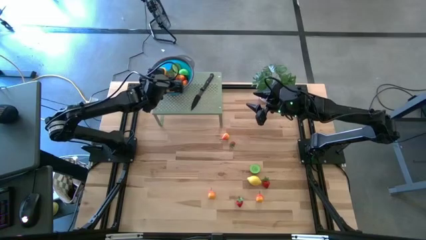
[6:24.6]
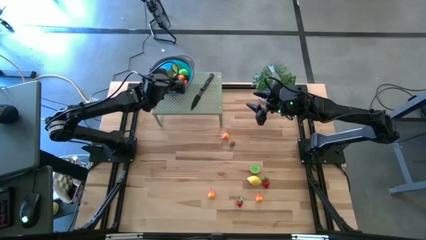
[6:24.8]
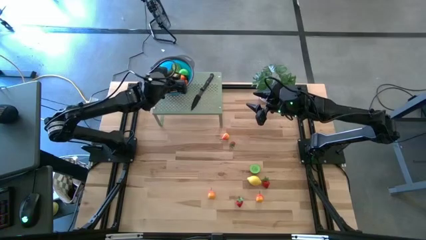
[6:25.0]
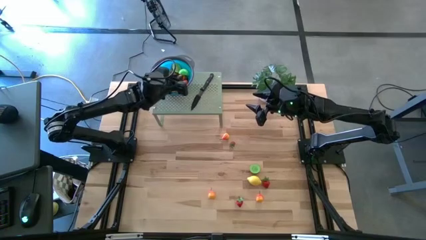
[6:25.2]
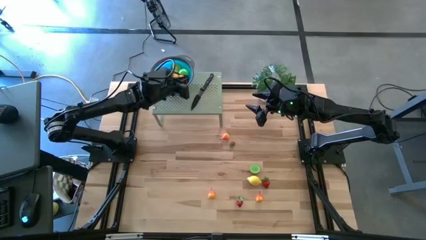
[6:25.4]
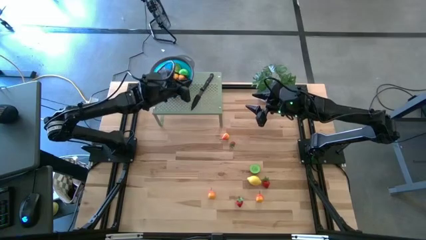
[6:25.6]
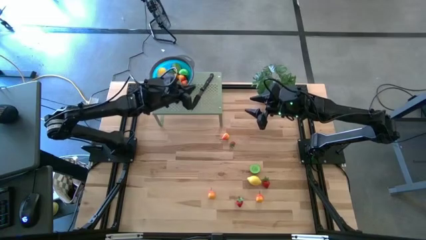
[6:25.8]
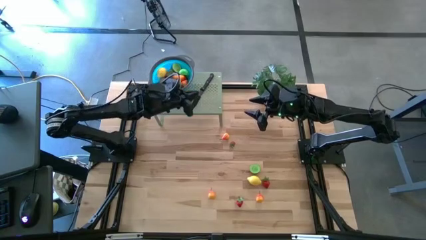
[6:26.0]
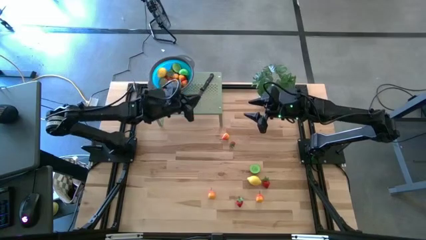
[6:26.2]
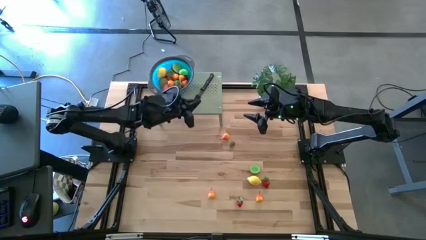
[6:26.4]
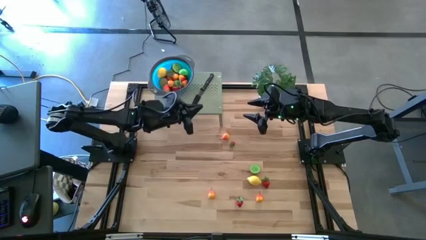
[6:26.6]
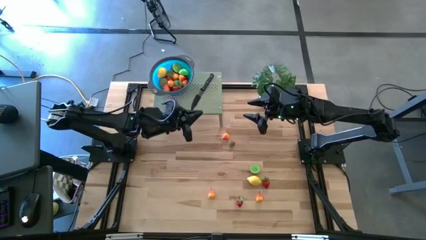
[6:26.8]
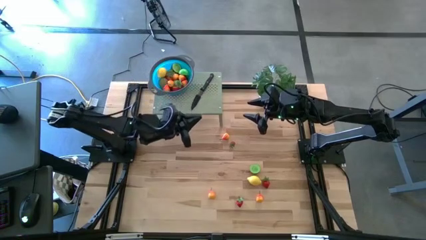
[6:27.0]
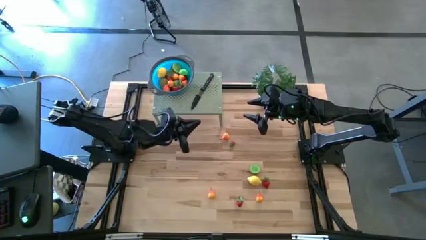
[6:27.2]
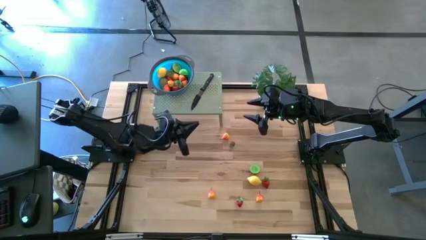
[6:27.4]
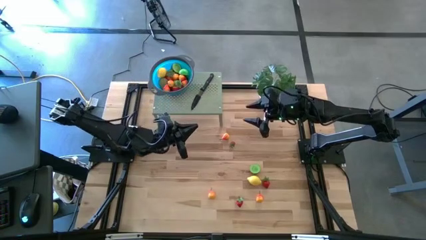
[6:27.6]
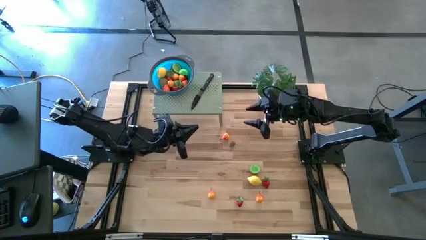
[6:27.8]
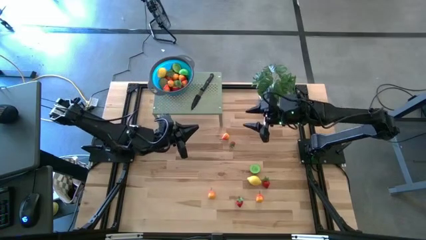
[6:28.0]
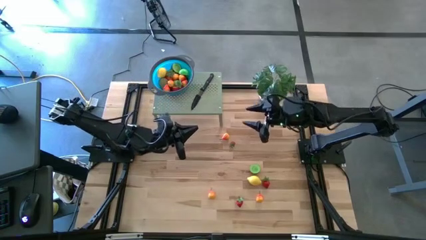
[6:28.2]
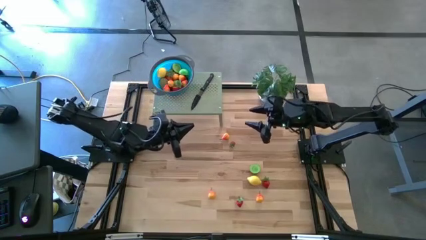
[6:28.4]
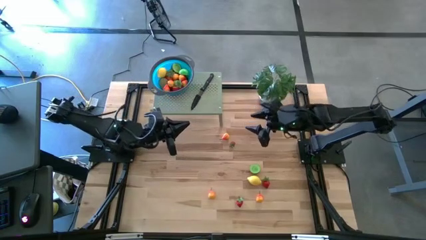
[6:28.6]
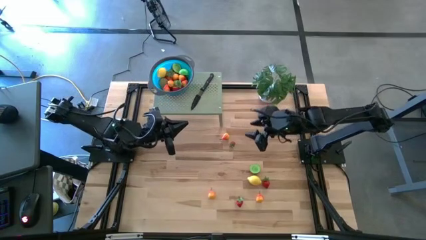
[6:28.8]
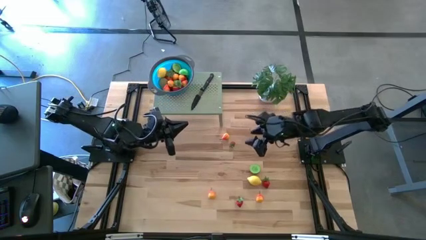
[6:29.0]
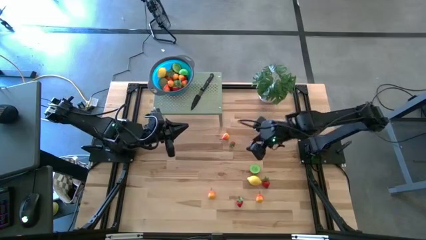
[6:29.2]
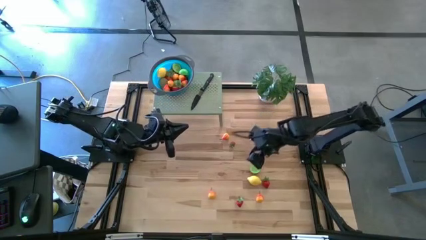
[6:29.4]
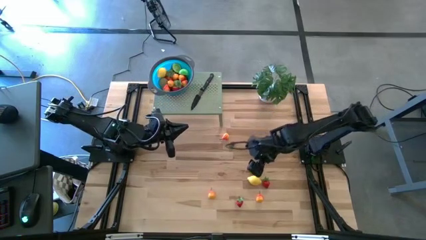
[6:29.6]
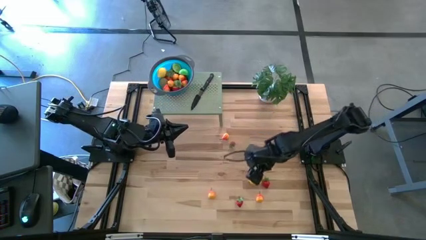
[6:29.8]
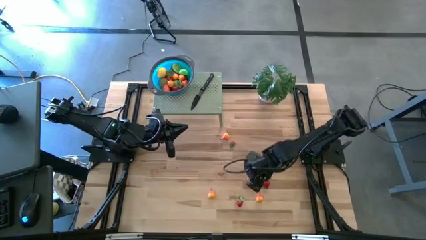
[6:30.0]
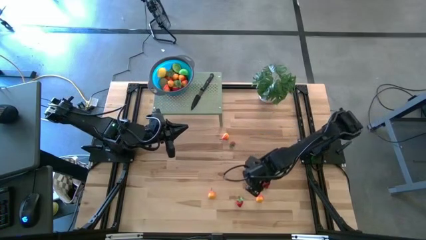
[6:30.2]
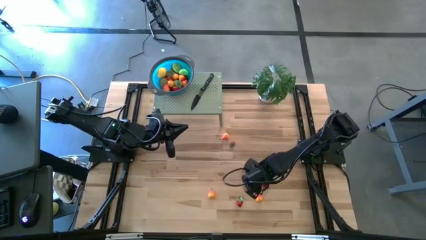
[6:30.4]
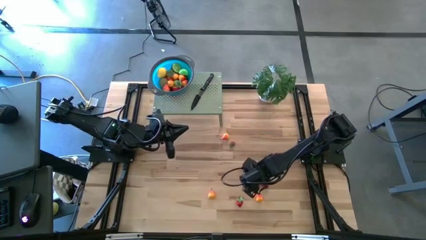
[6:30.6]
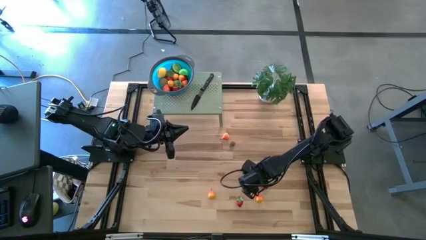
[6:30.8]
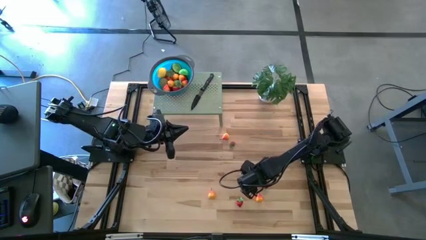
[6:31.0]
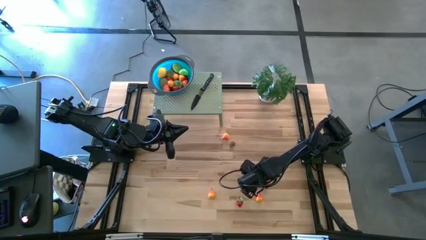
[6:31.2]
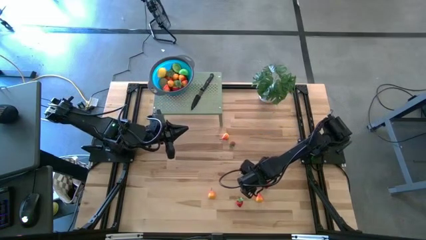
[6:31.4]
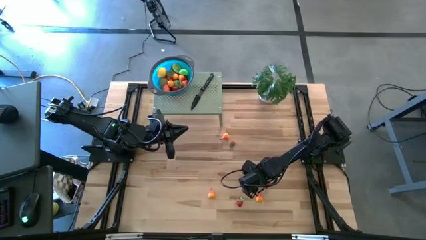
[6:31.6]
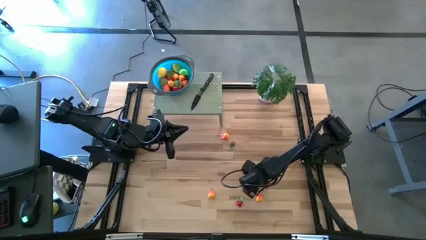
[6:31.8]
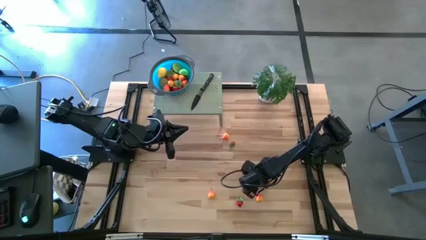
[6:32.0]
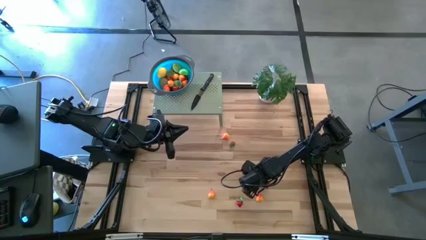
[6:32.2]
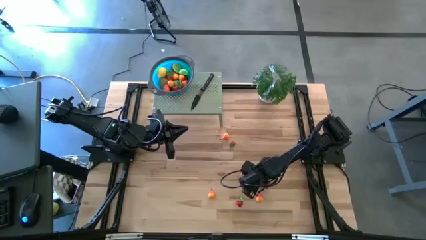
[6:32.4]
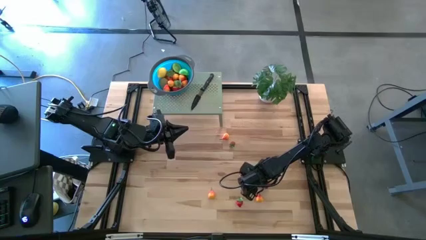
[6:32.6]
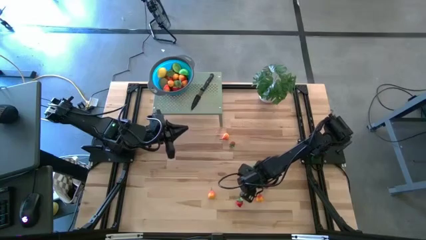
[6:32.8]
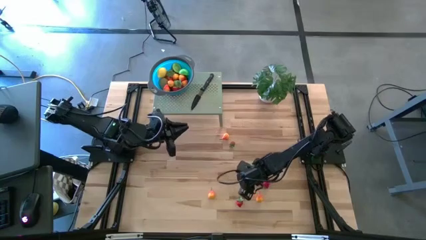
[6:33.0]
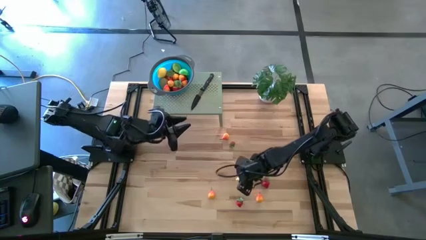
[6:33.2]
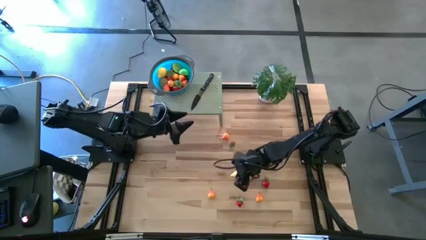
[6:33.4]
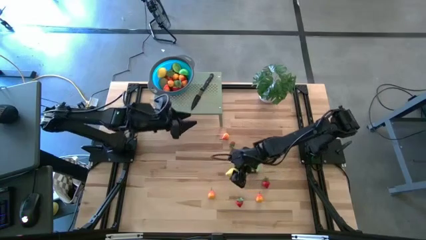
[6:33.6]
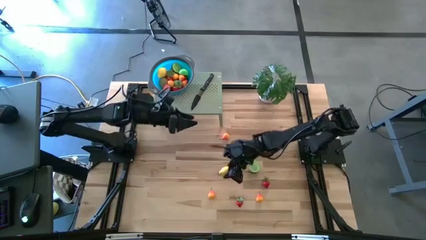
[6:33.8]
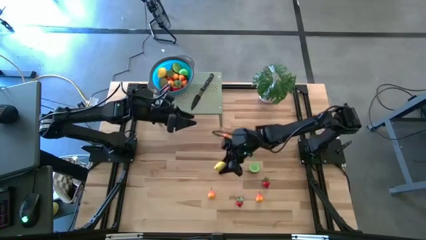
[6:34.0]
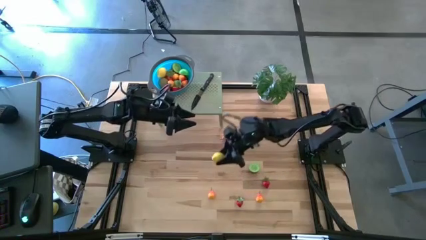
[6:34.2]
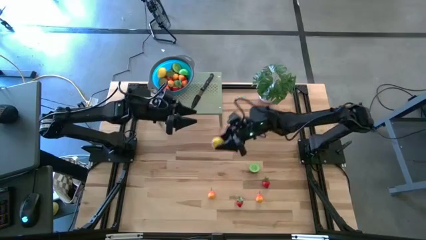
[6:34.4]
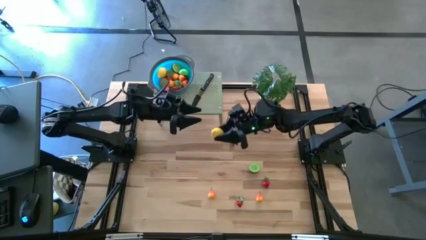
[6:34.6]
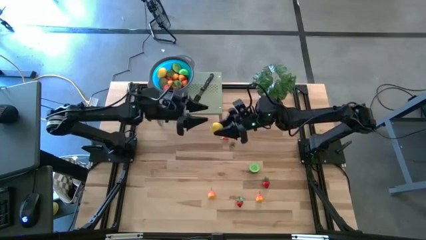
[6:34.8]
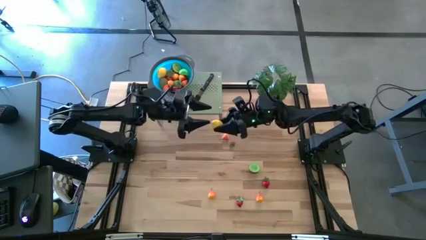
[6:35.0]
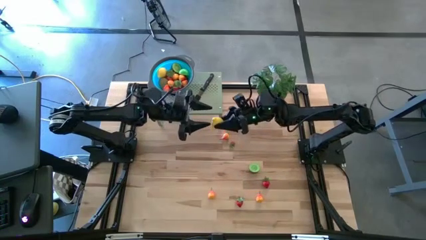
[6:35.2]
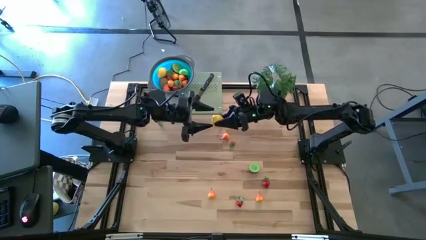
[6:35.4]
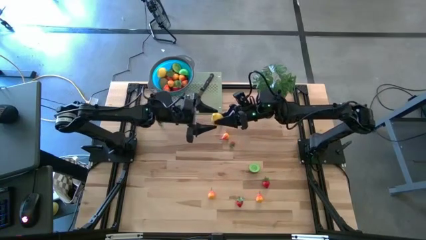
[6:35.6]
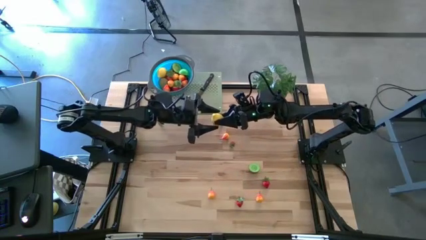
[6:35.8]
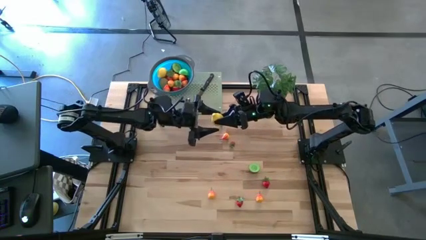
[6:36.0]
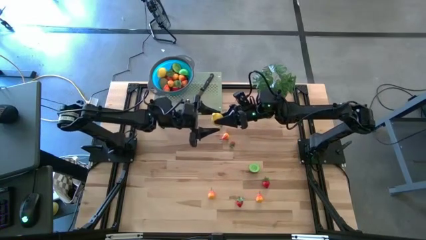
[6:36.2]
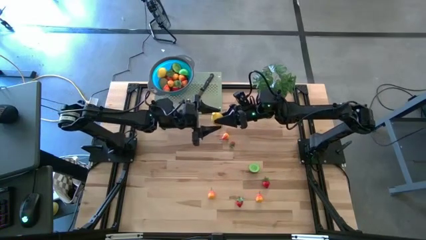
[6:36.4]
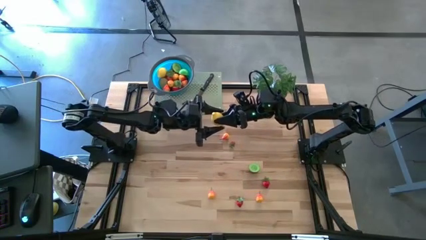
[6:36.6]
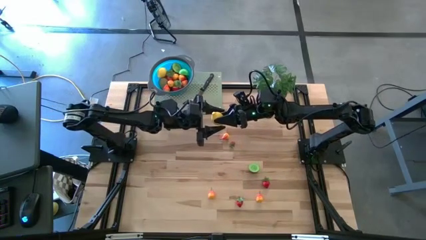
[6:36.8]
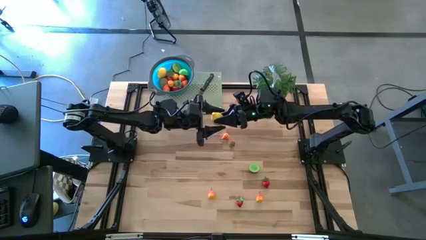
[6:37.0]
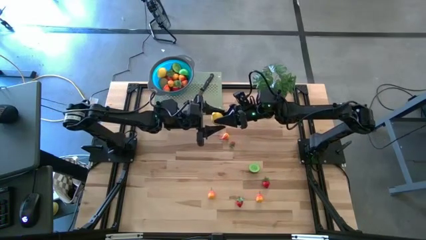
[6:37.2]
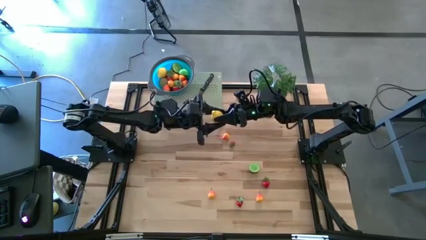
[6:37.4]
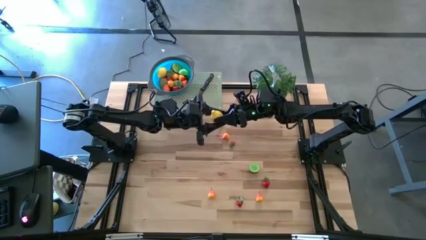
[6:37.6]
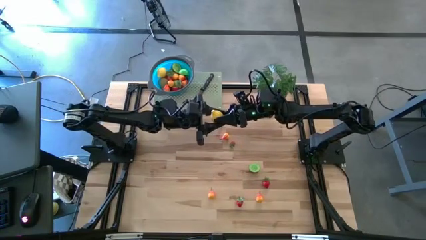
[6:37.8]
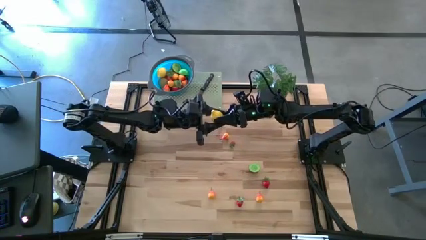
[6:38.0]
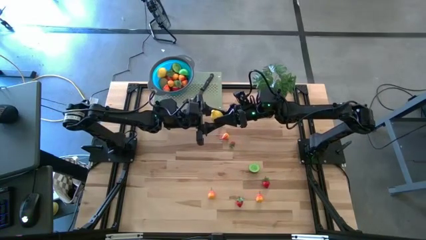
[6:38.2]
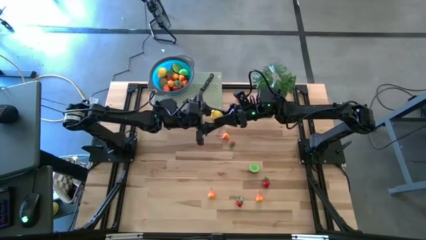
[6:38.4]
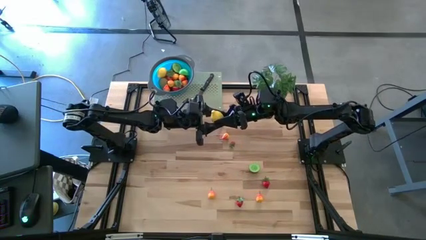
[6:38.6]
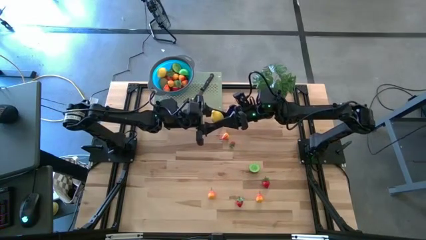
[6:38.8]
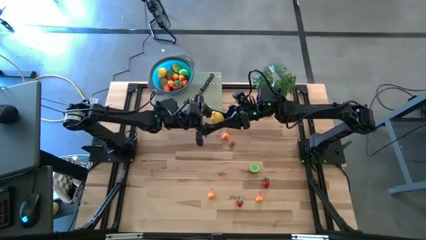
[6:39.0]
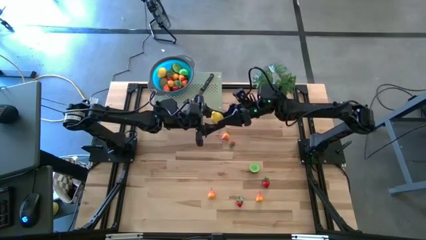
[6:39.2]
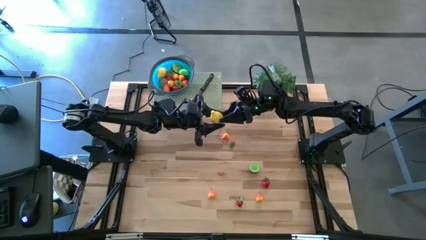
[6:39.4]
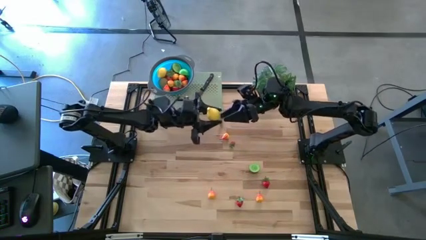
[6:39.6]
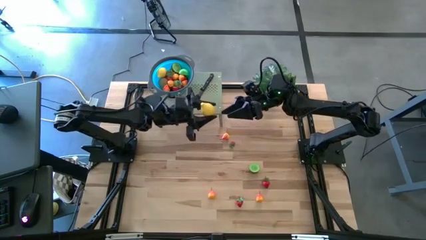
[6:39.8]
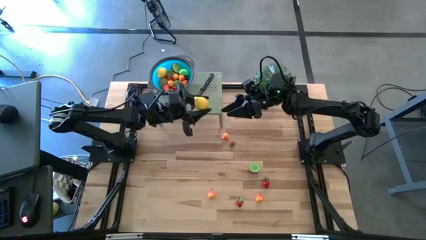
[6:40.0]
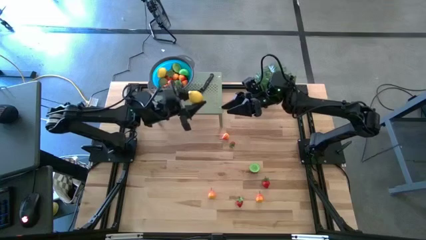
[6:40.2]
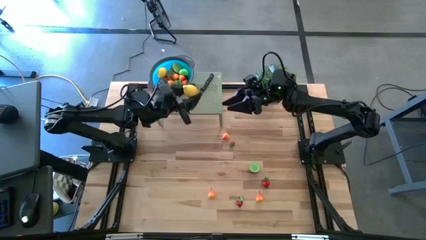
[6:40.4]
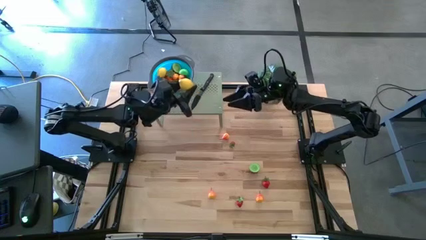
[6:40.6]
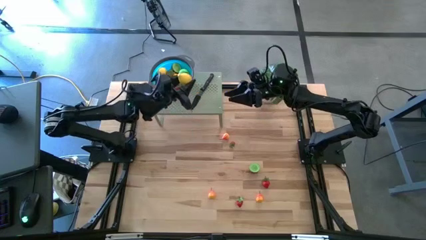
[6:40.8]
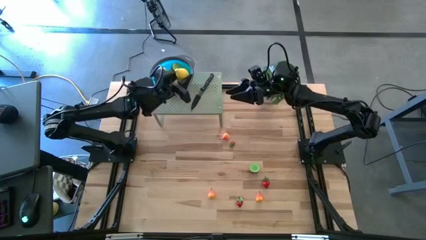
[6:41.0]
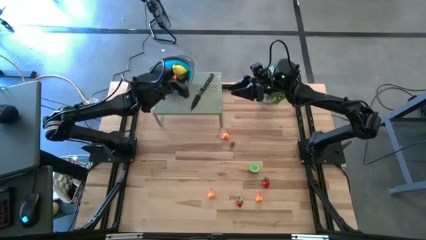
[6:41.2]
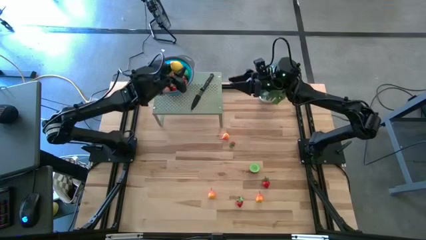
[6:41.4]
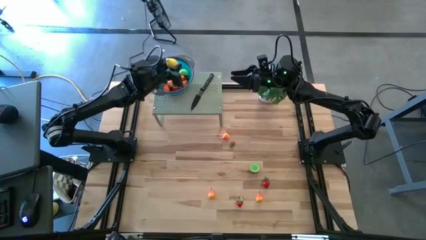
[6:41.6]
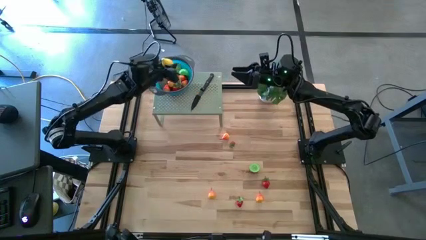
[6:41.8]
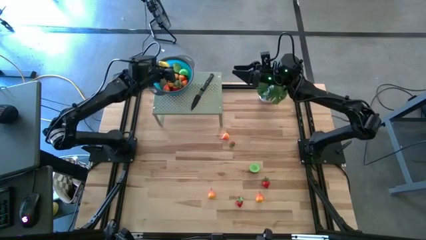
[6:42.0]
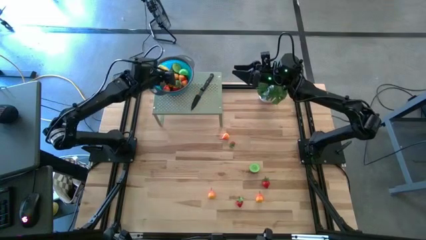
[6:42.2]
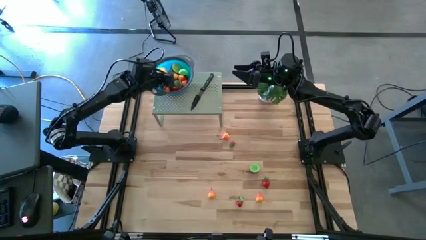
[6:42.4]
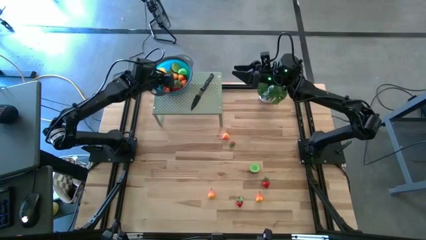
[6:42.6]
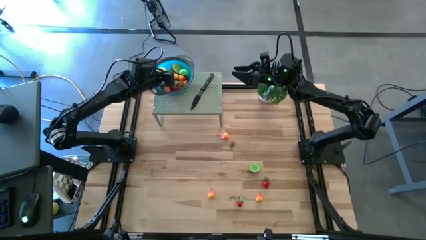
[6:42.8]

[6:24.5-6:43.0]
Task: Pick & Place Fruit
Put the lemon into the strainer bowl on the shelf
